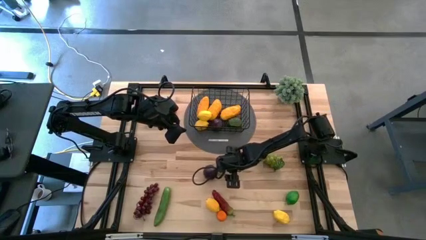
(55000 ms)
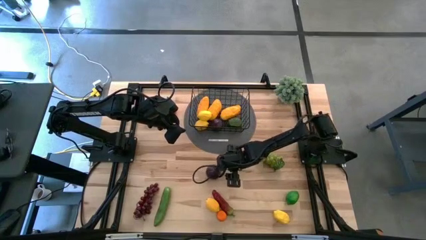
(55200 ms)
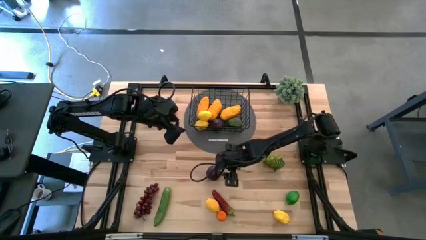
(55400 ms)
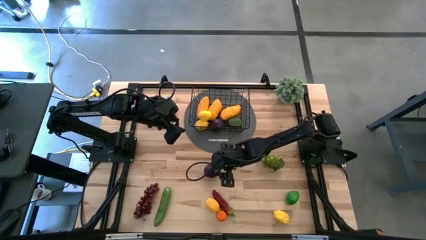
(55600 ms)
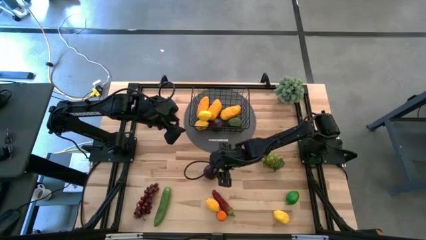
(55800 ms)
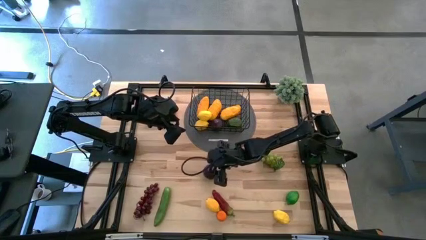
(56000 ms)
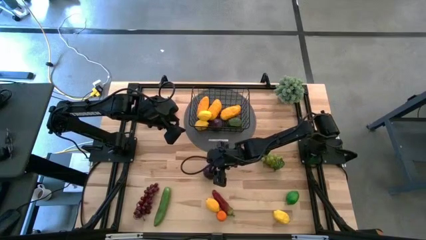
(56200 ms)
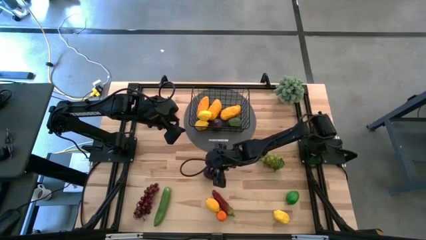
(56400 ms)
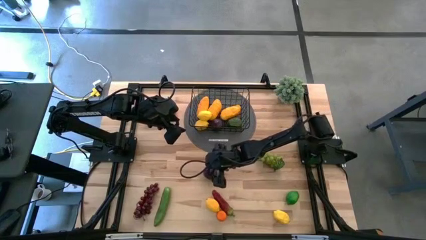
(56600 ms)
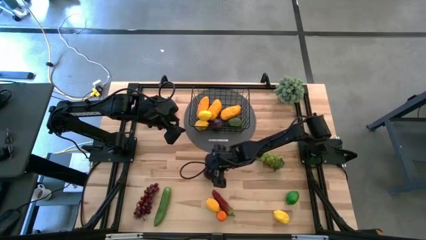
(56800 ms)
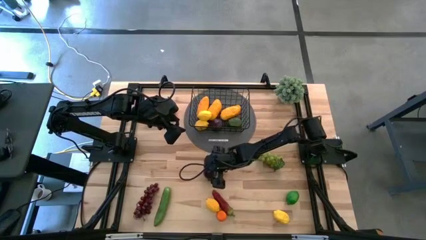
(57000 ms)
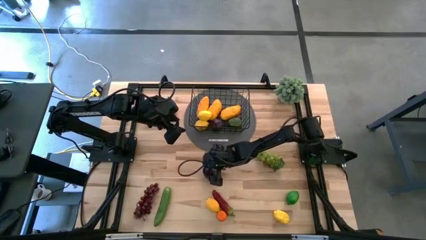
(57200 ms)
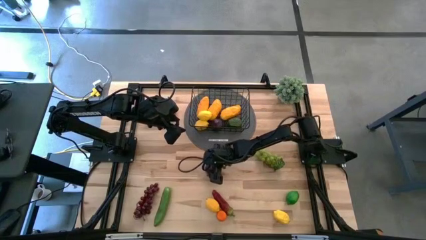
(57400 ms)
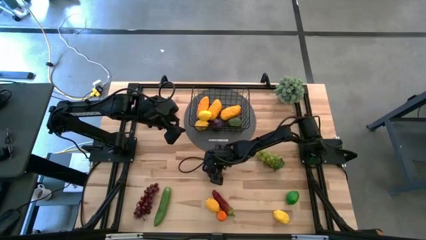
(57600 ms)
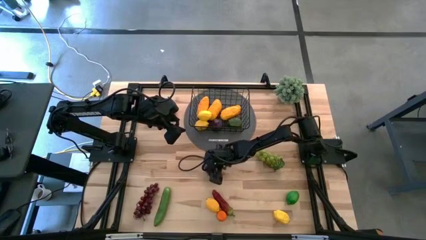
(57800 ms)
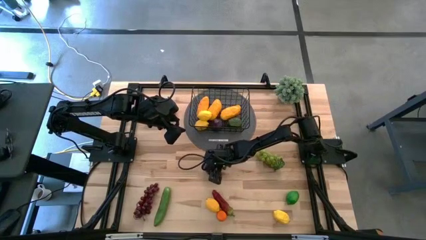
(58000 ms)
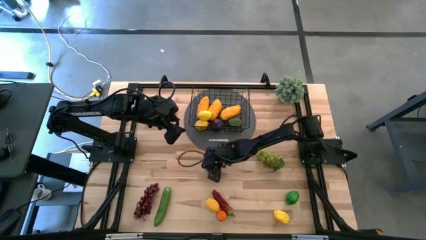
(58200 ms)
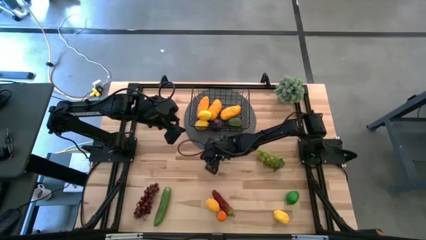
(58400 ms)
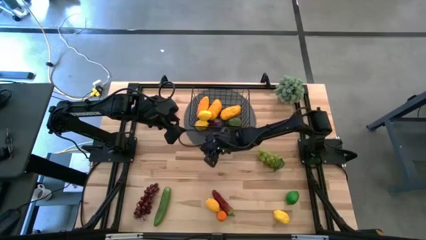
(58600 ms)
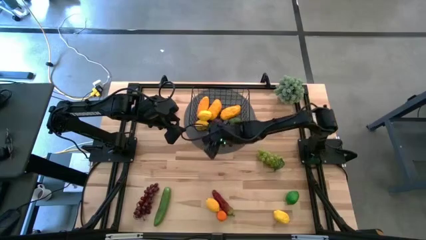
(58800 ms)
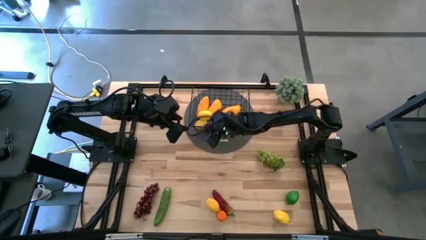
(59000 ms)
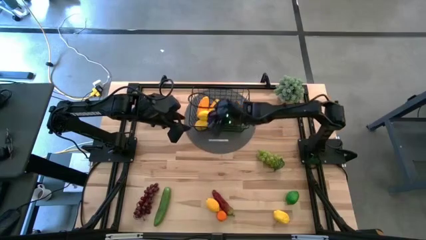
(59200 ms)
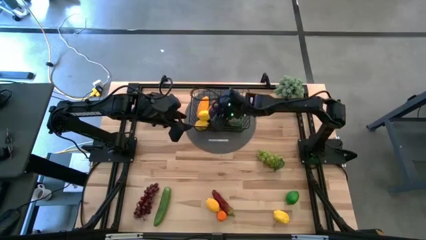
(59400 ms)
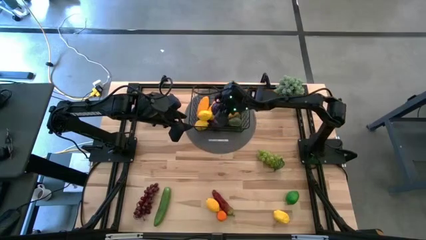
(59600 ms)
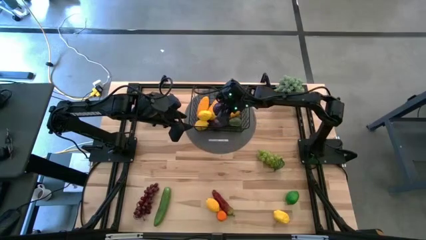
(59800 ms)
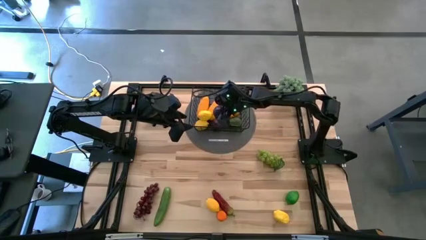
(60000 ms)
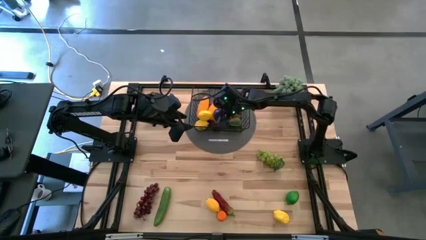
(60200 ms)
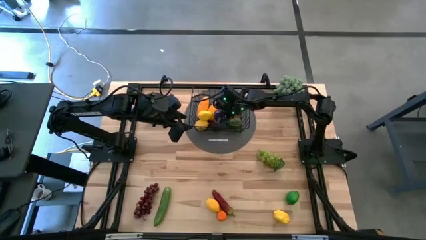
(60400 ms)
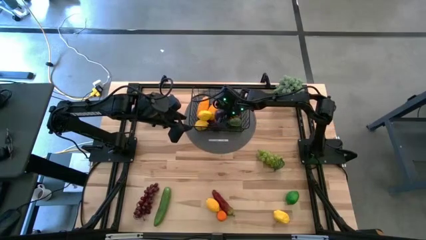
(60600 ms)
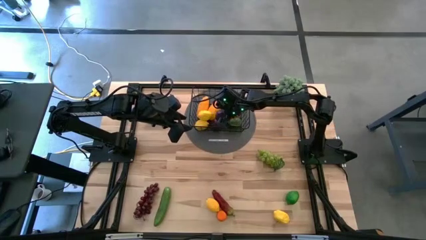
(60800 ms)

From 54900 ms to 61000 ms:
Task: Build produce basket
Put the purple plum into the black wire basket

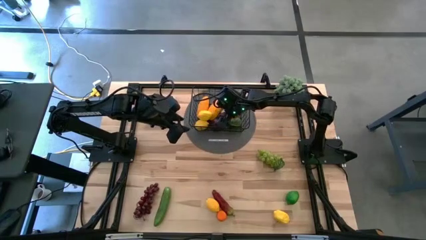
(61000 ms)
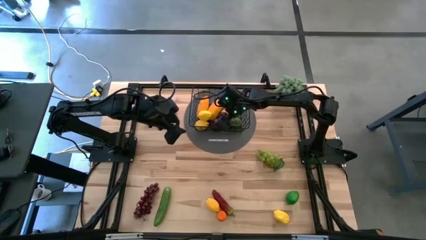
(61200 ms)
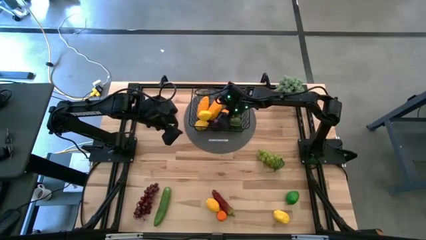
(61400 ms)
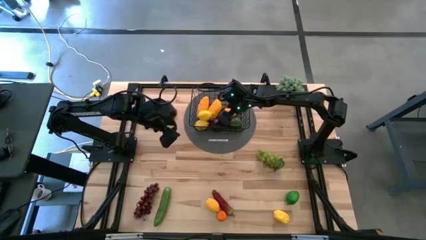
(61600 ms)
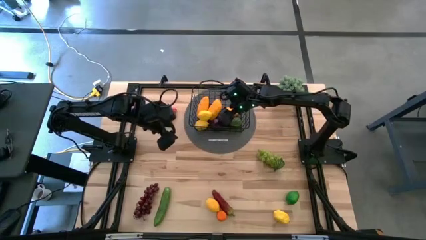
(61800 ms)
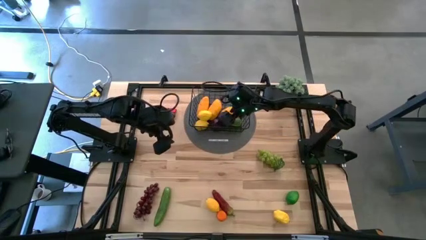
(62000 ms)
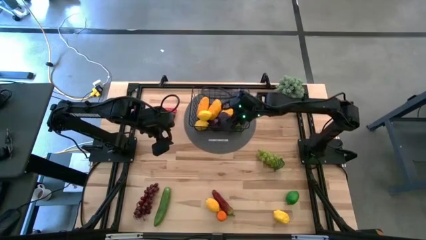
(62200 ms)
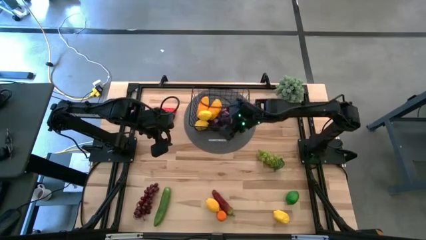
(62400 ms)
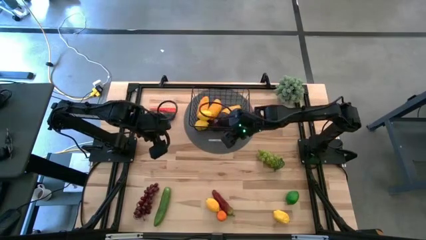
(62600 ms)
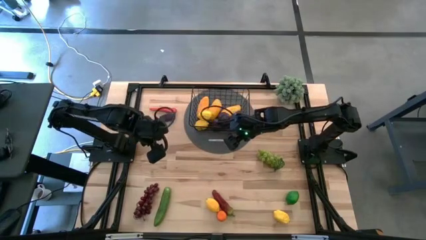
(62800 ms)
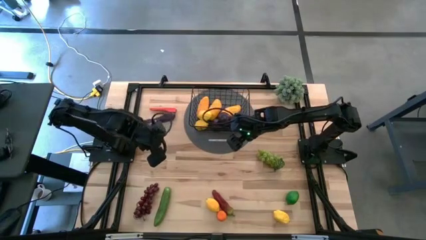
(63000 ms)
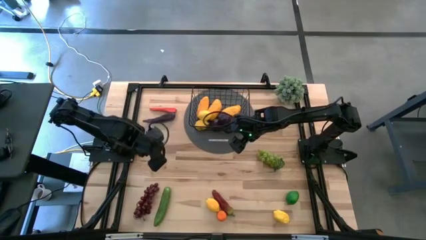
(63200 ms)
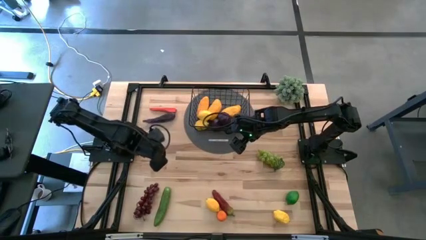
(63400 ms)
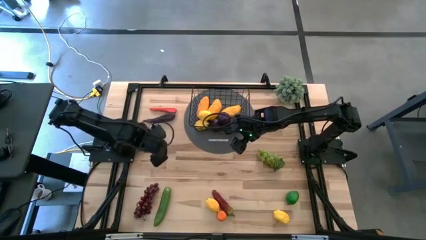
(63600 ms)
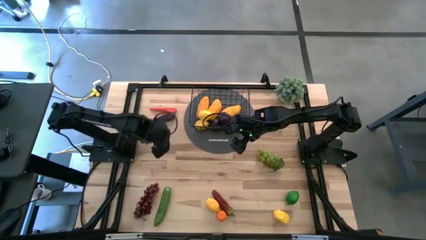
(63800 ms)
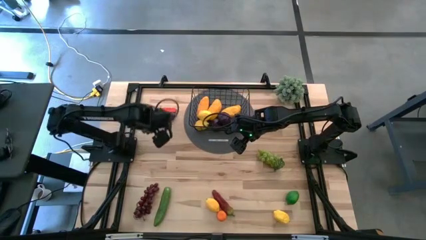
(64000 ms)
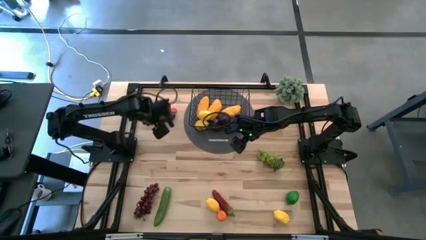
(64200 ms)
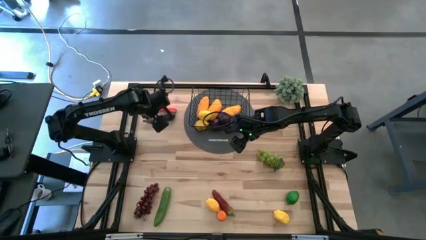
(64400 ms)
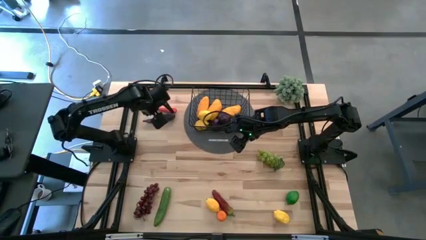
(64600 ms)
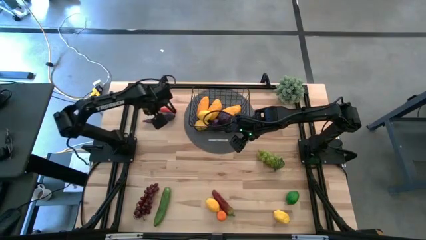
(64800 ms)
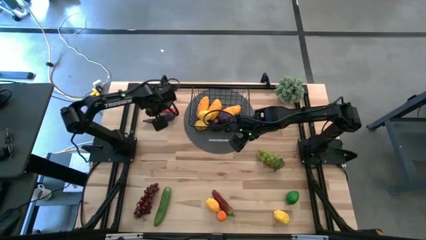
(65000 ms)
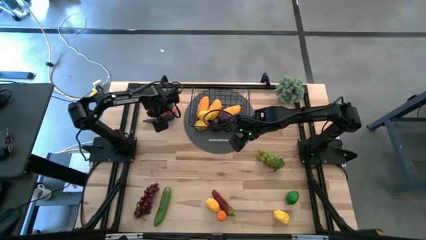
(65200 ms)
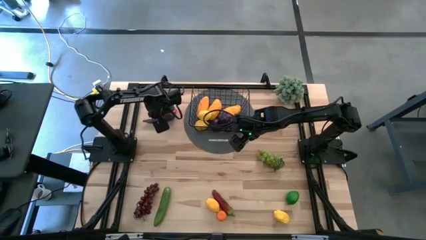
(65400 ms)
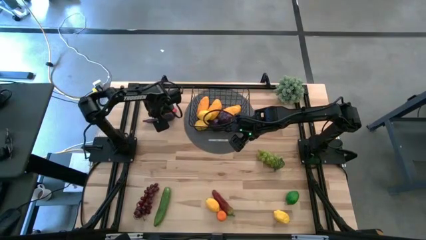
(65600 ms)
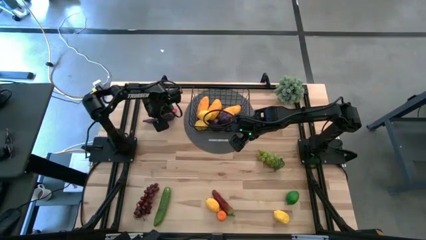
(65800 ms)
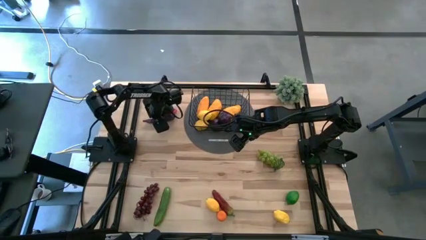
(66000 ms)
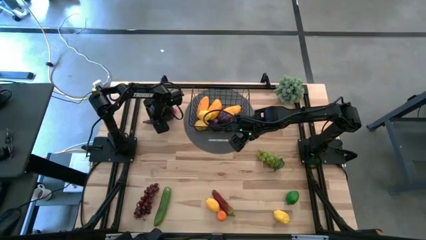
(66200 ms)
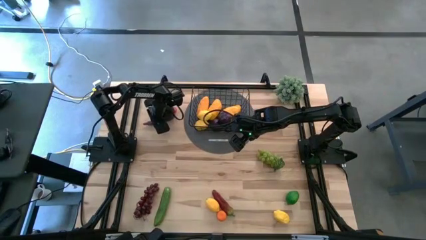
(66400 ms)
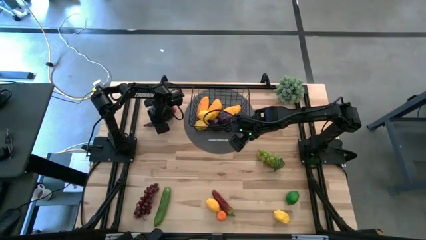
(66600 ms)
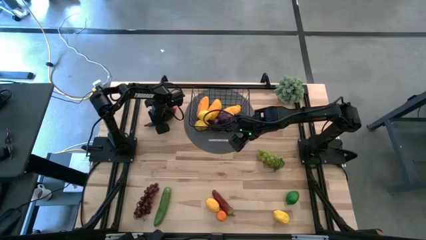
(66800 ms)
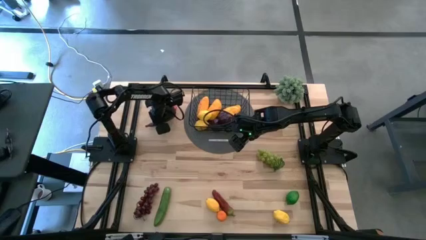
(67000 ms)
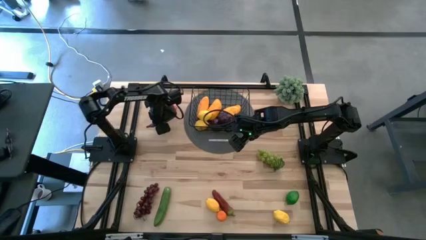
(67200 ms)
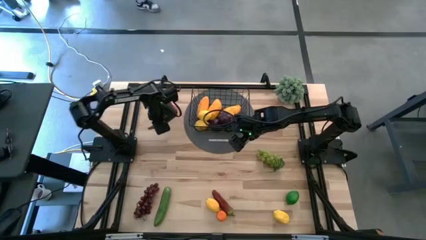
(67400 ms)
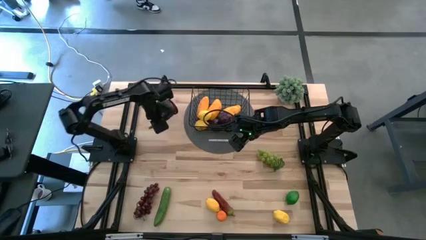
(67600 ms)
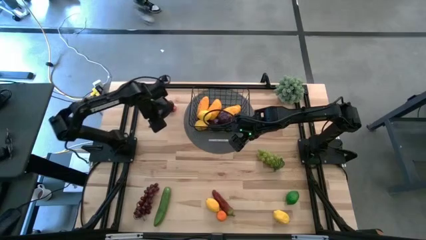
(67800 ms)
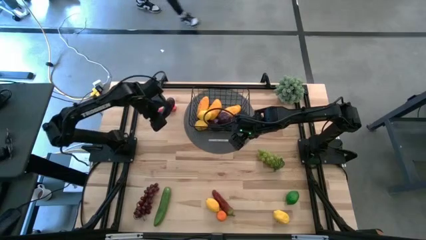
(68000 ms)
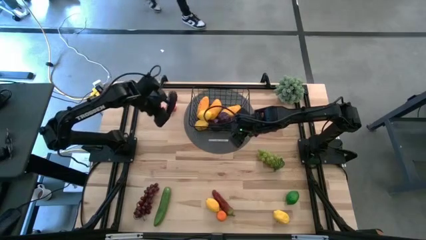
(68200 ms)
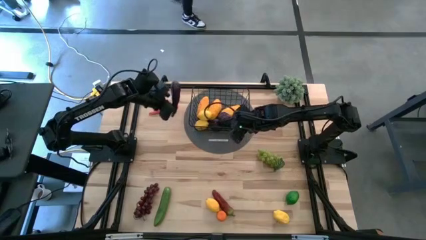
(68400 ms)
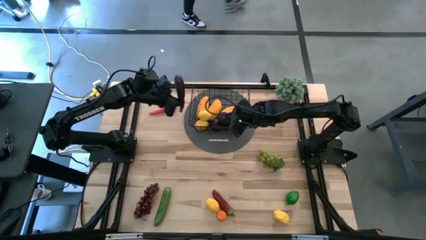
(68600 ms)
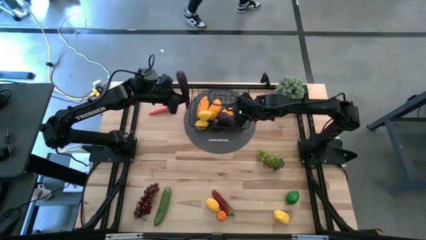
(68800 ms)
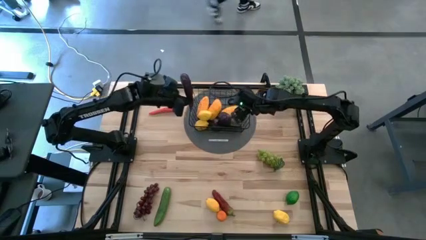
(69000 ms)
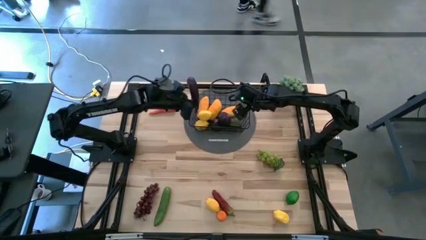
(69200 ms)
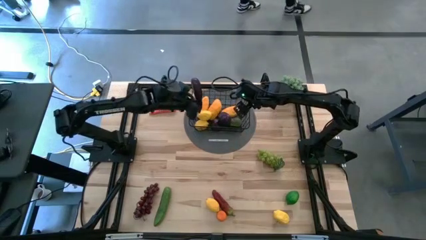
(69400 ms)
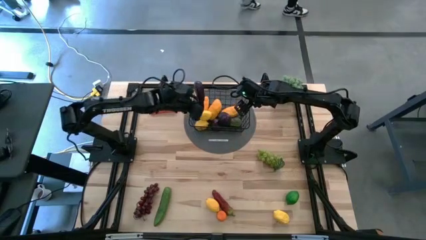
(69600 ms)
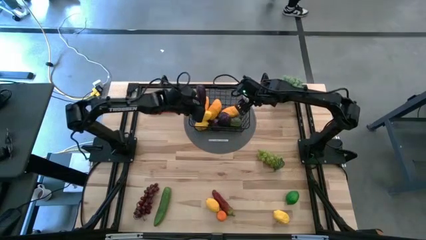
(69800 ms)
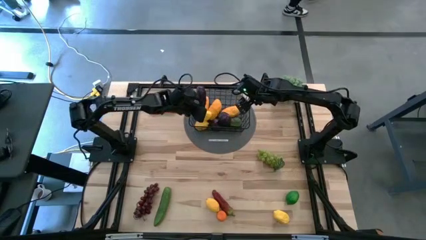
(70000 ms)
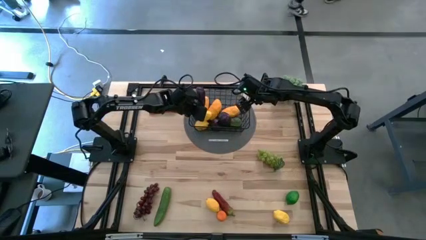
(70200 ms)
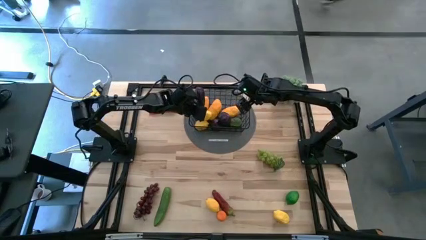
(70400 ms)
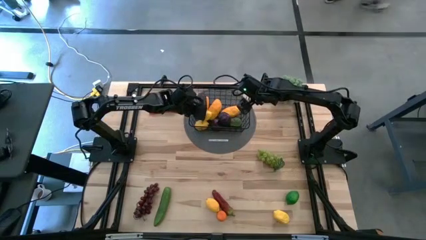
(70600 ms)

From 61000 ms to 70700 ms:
Put the purple eggplant into the black wire basket

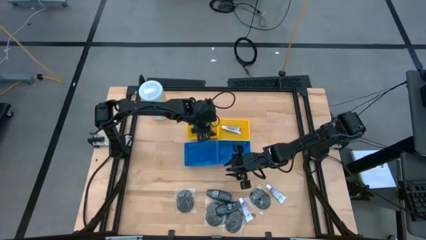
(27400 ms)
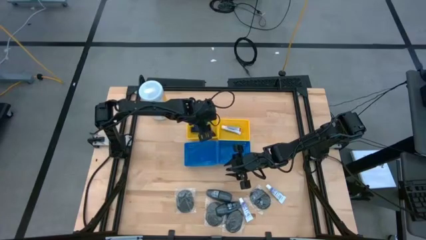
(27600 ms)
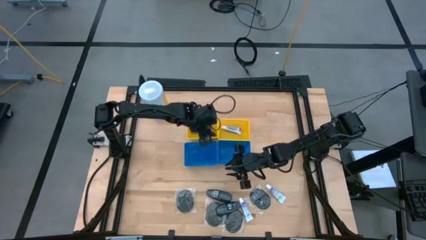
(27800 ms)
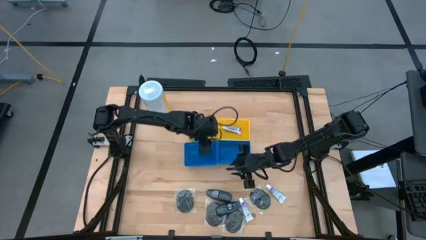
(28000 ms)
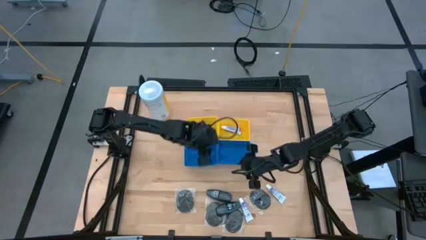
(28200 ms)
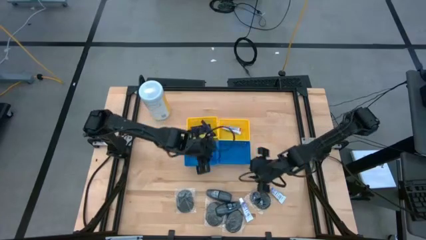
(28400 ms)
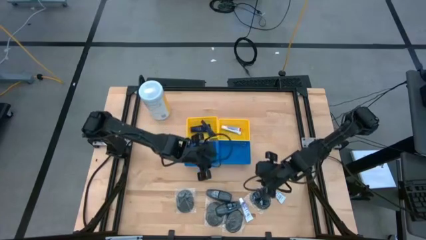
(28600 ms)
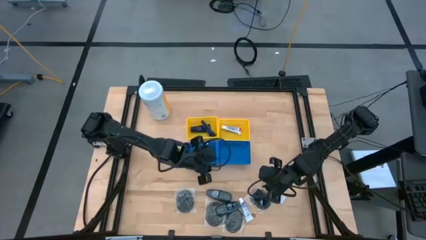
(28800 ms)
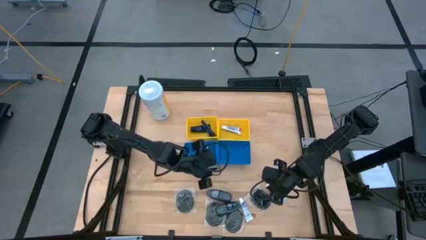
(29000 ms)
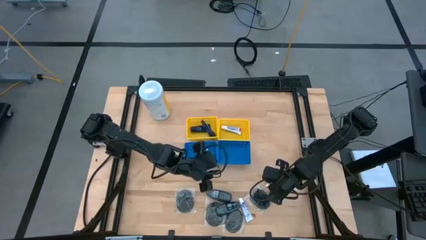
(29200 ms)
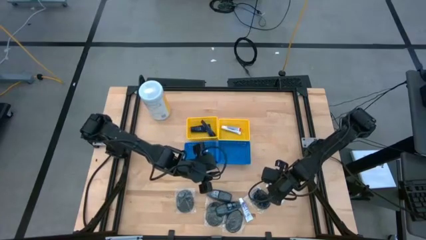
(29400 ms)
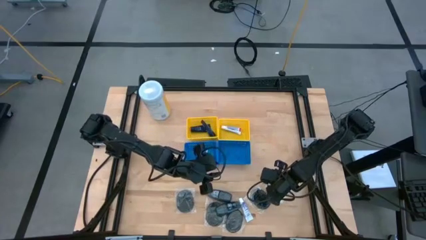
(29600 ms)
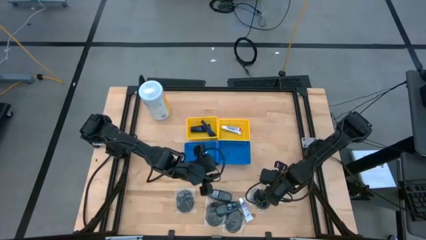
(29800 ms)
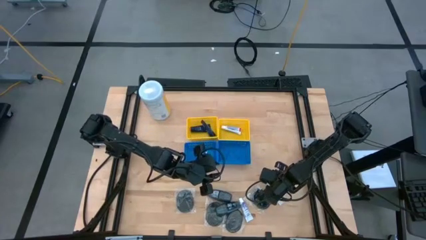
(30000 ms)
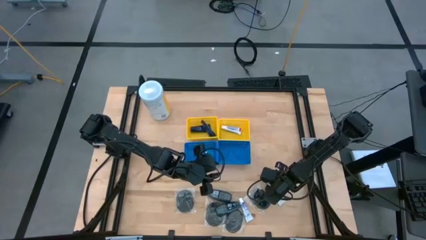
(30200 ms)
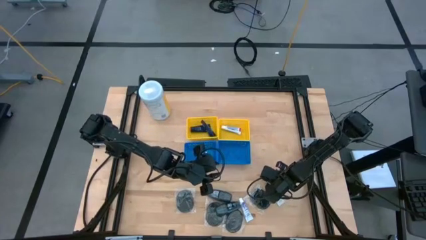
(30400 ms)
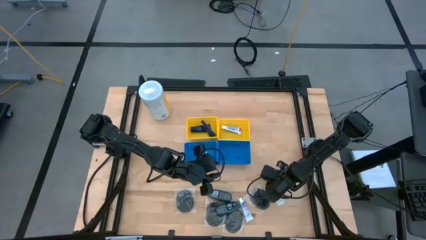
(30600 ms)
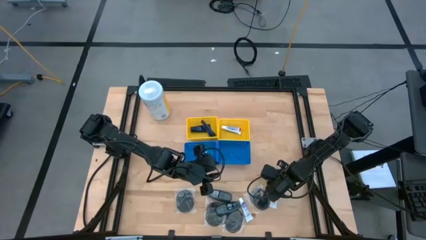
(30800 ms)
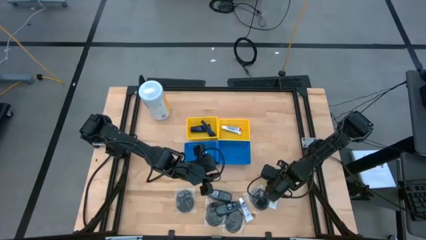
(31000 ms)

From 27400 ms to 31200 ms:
Task: Pick & Place Travel size toiletries
Put the right toothpaste into the right yellow bin
